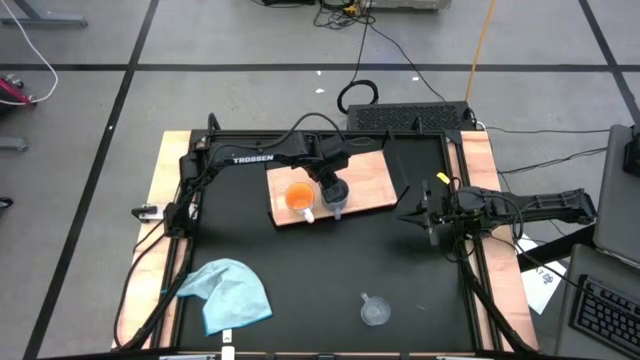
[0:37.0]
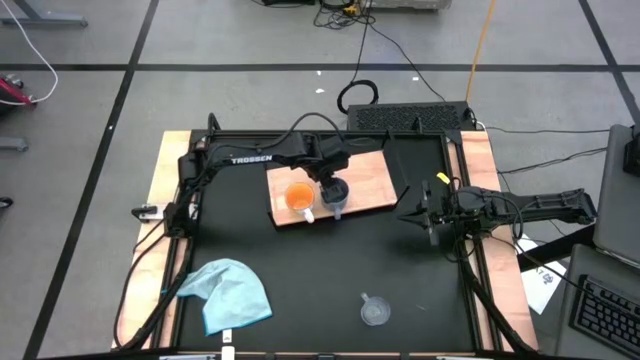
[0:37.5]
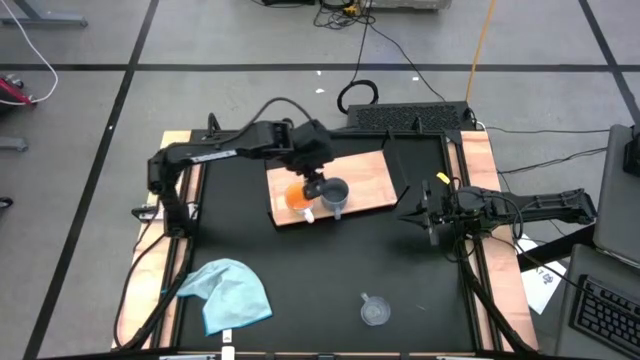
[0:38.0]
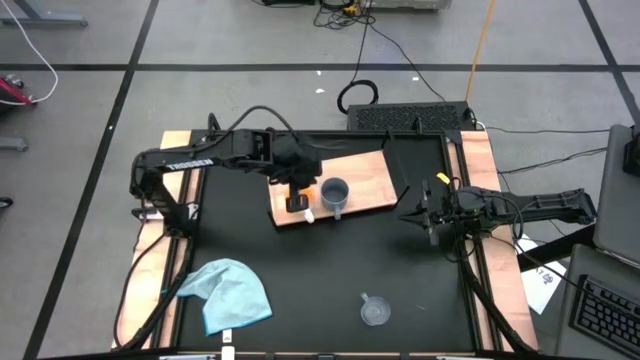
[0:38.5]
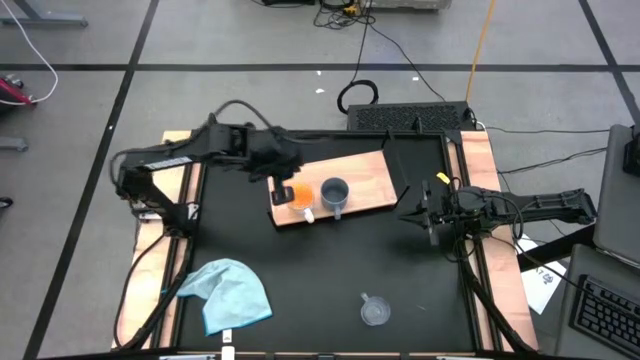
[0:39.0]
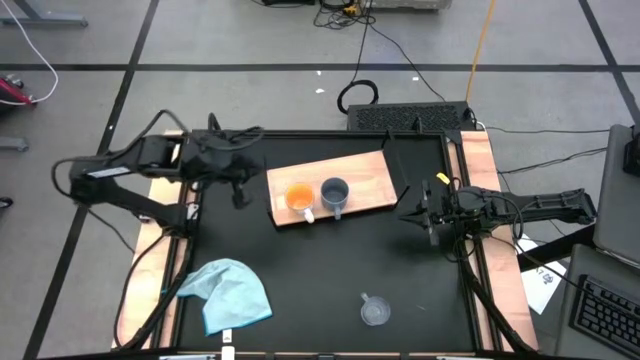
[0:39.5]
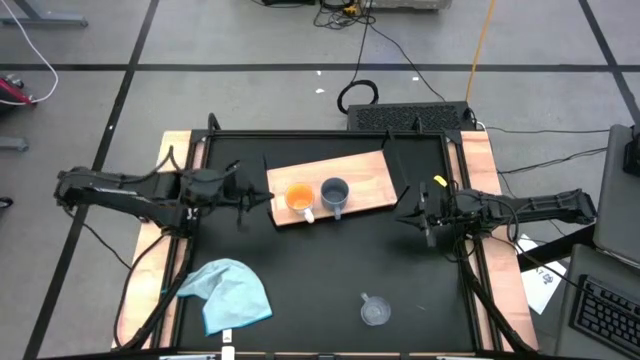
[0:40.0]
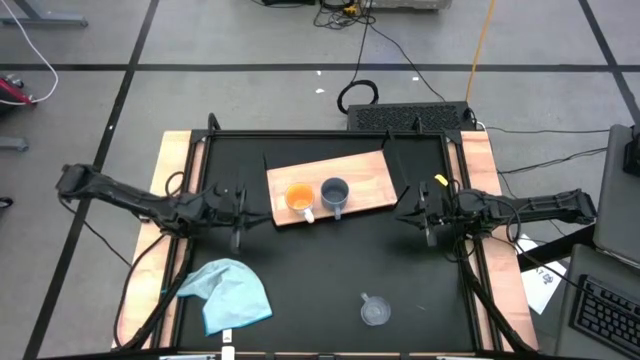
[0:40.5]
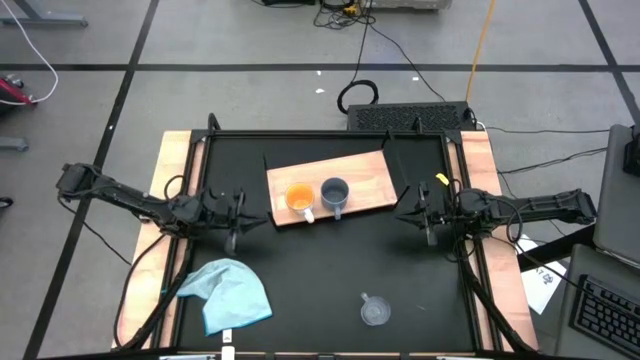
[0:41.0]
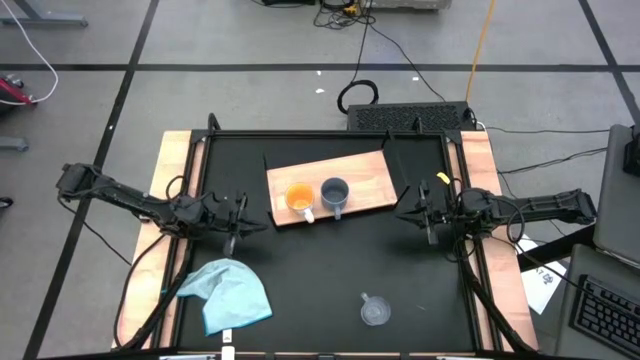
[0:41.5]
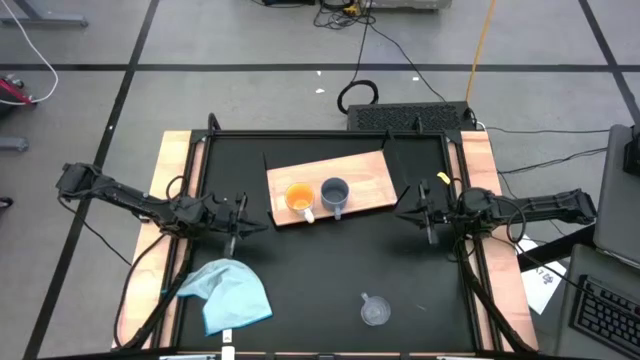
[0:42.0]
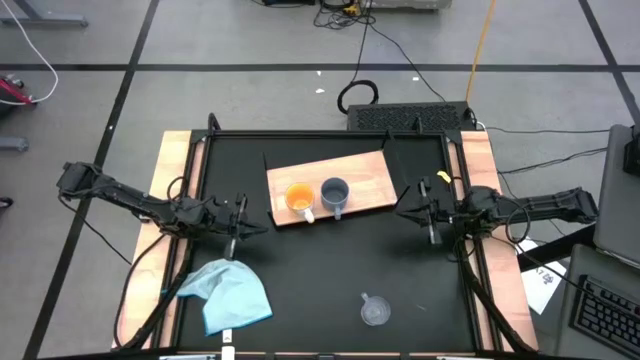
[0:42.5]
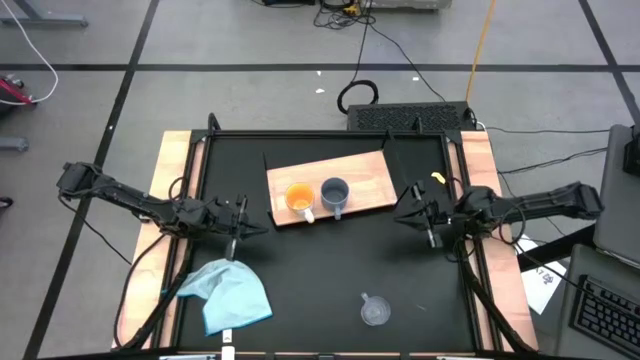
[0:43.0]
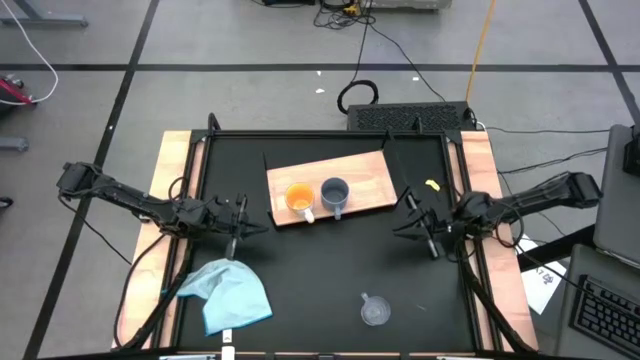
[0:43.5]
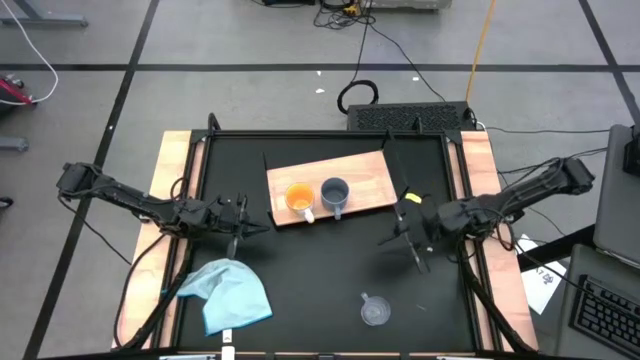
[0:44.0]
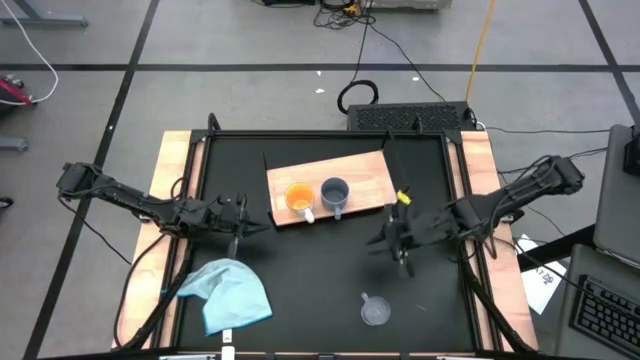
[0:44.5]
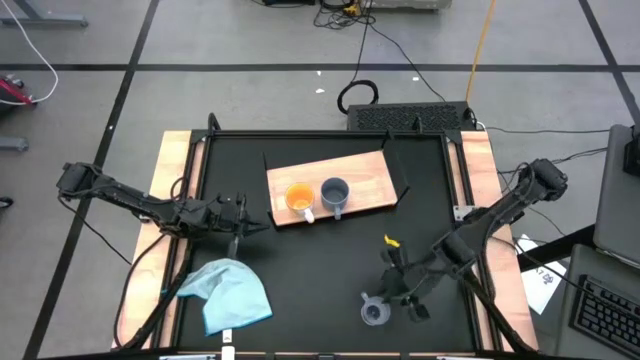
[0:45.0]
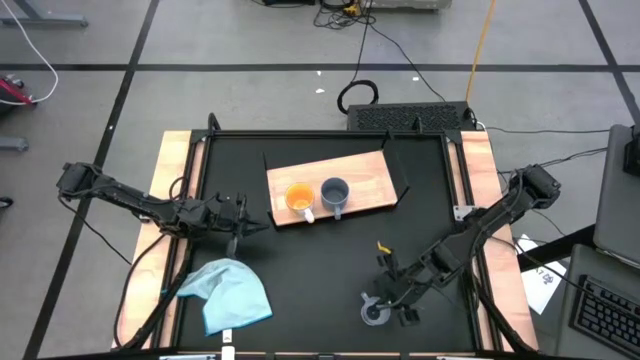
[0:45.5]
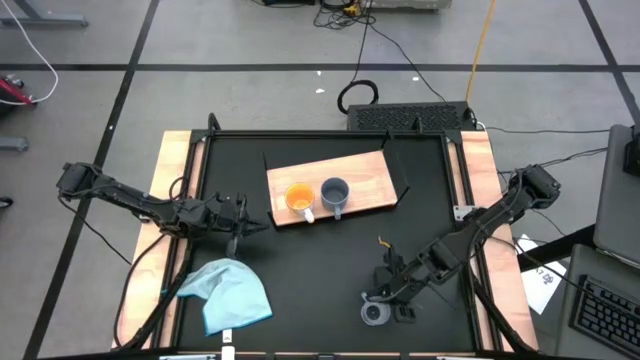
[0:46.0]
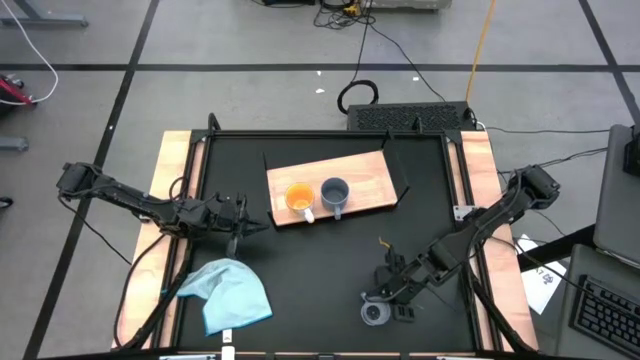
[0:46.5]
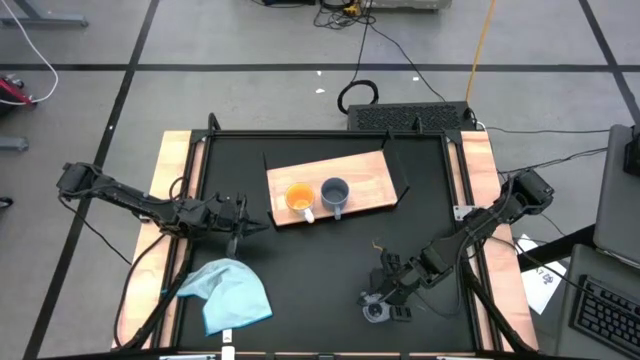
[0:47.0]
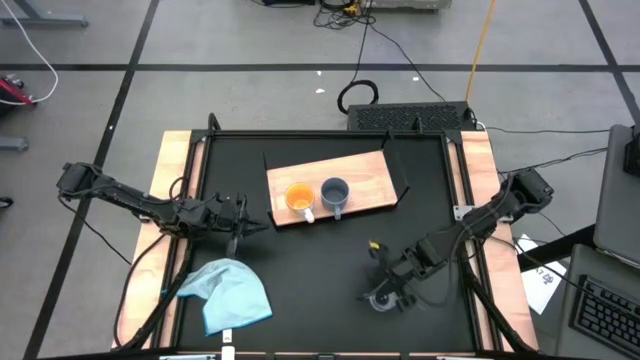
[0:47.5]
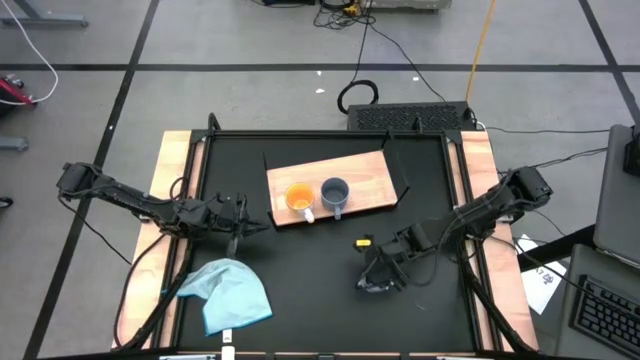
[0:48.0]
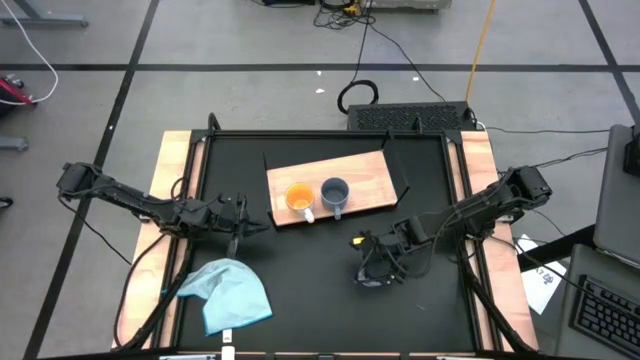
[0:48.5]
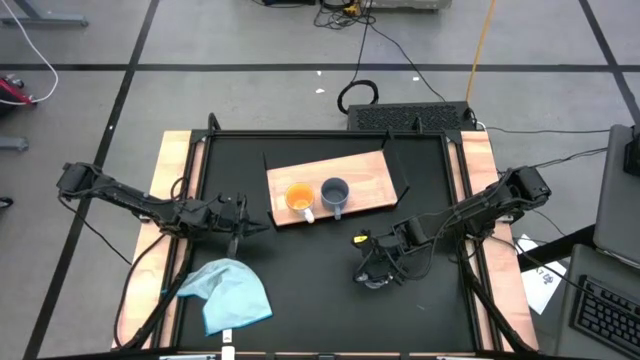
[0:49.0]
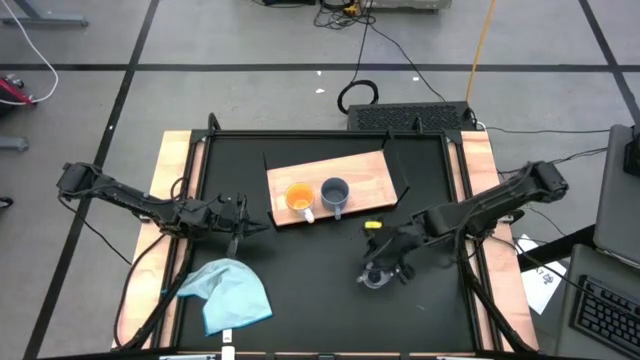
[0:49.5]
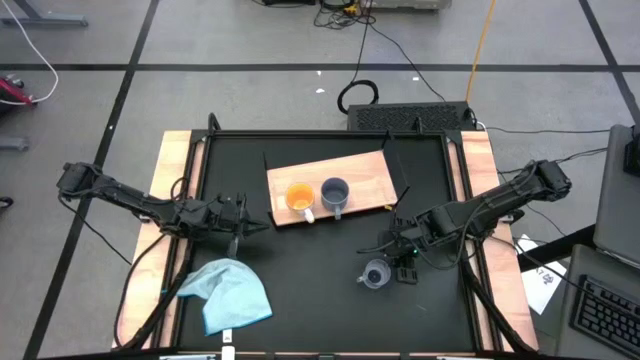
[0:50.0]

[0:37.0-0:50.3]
Task: Stack small to large cups/mugs on shelf
Put the transparent mug on the shelf
